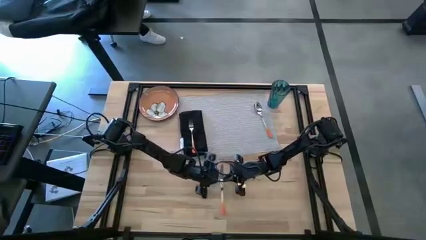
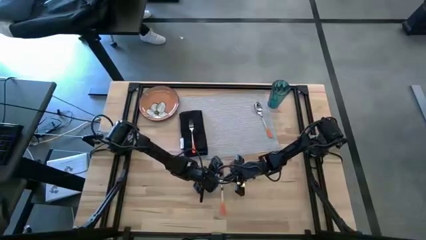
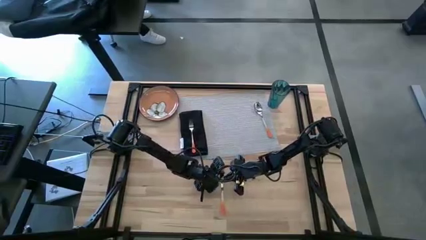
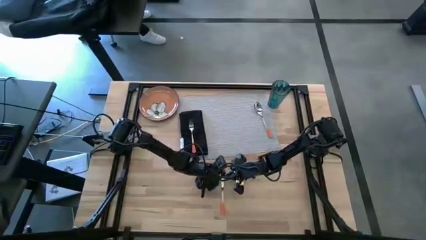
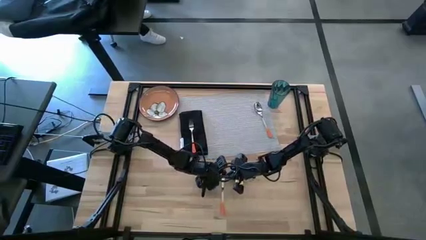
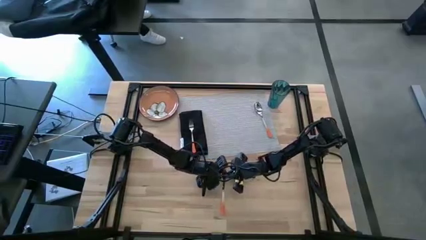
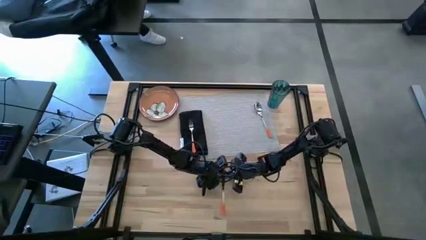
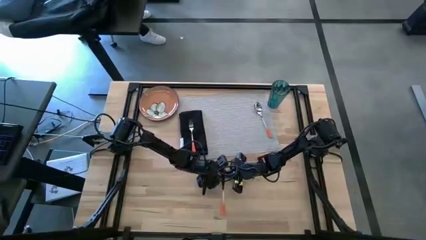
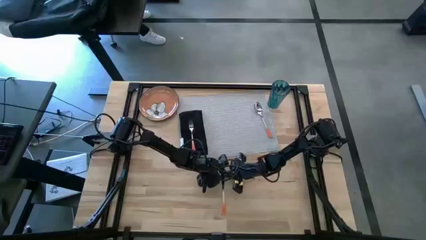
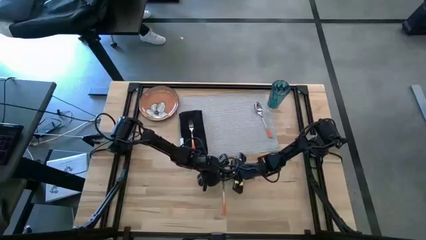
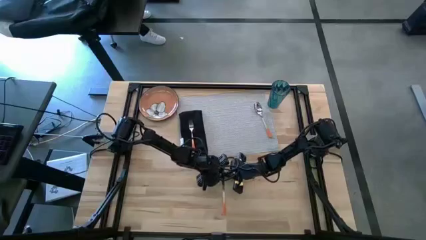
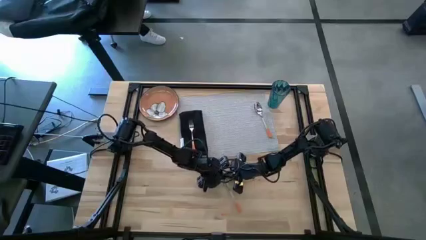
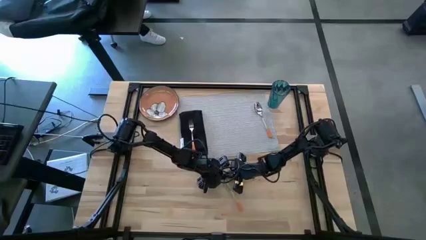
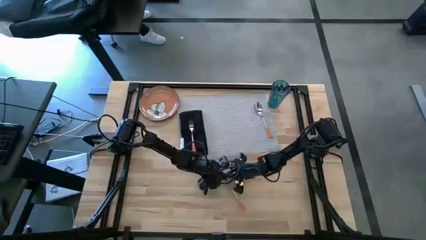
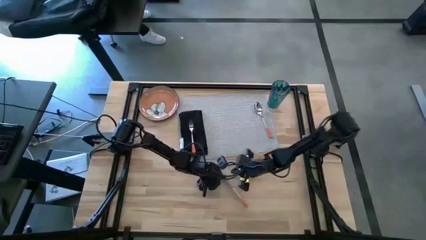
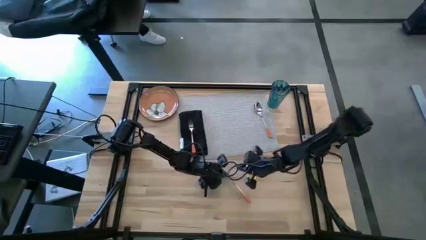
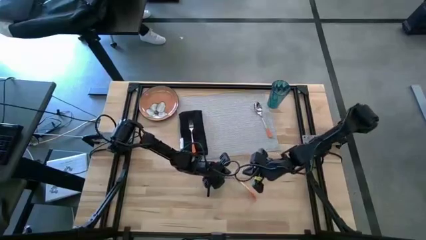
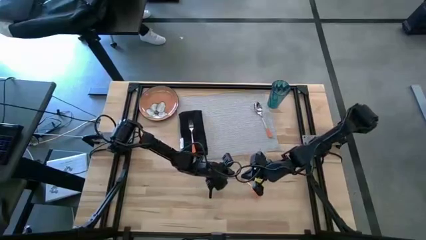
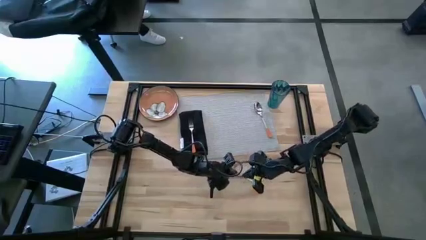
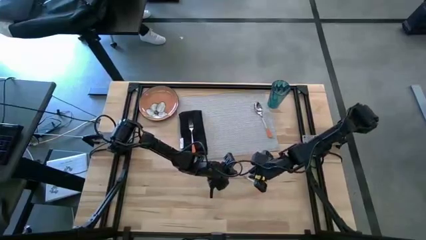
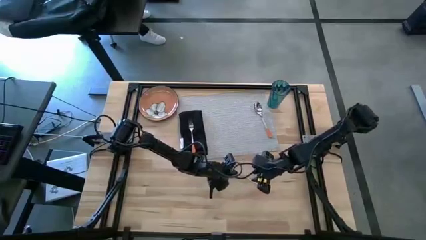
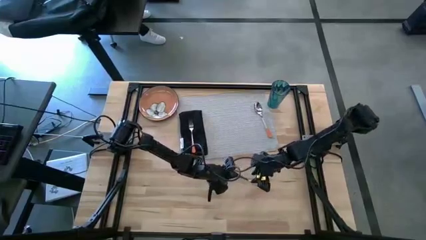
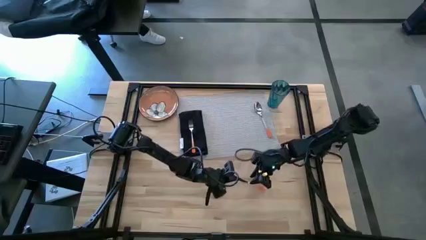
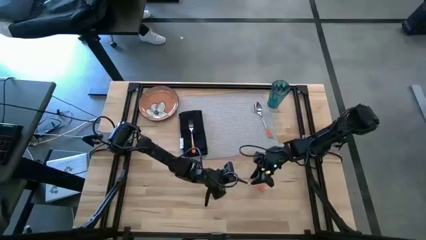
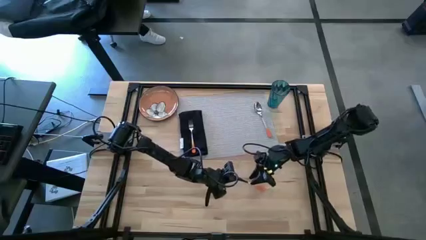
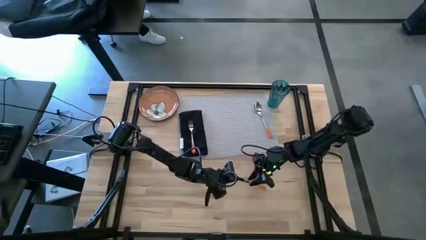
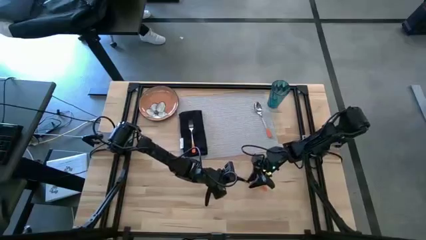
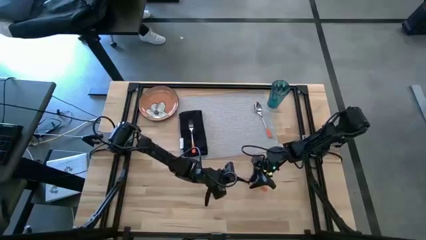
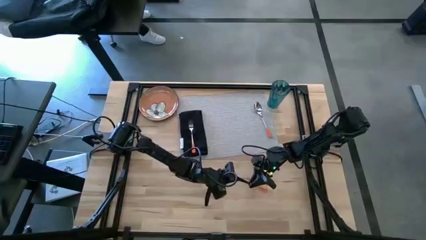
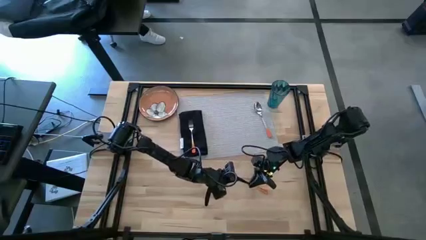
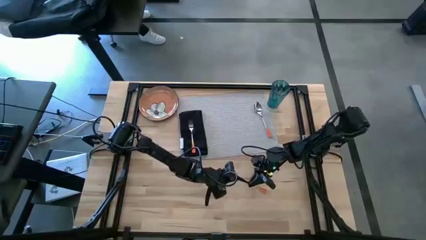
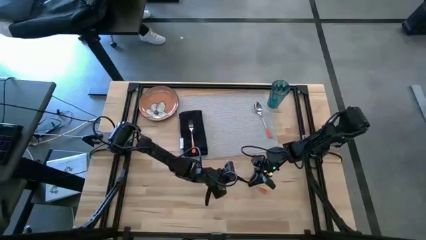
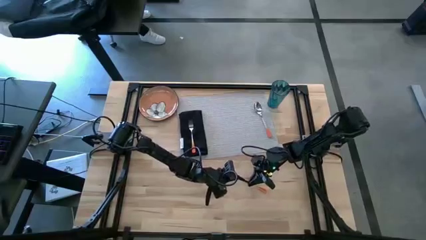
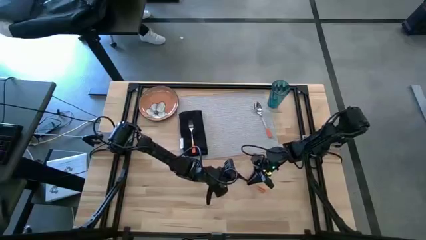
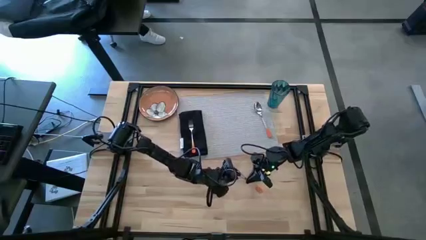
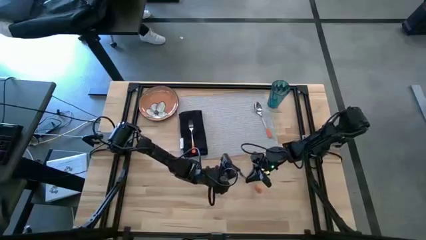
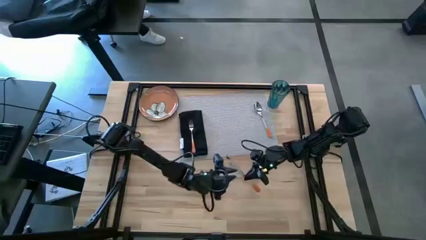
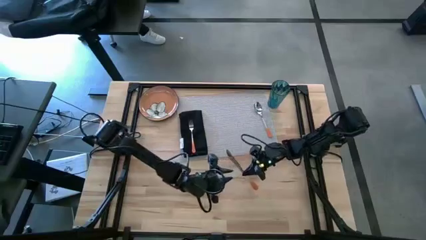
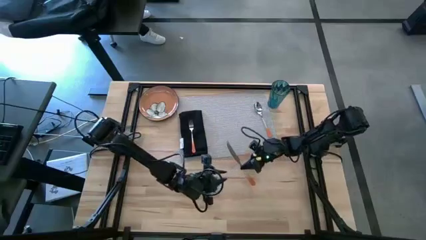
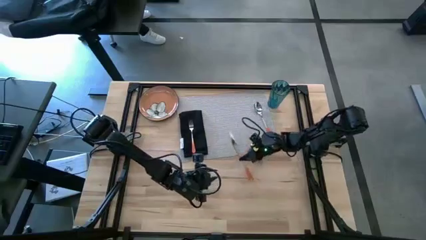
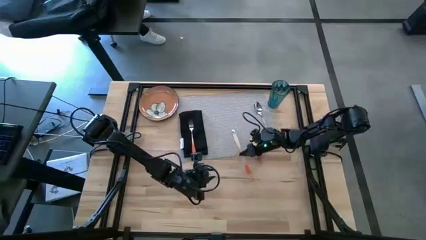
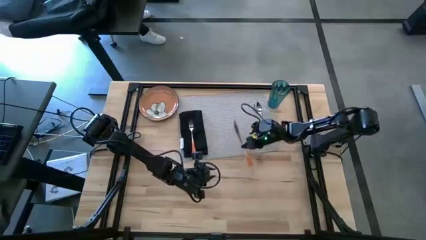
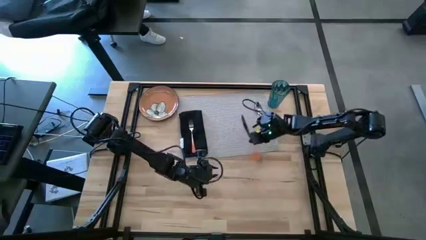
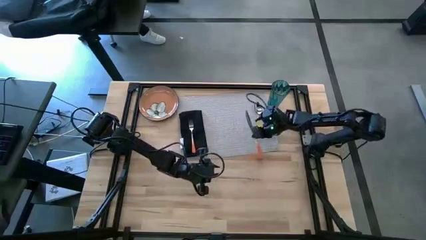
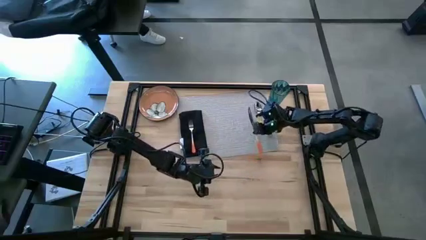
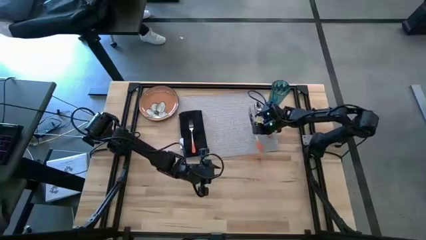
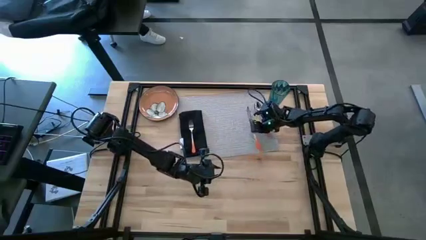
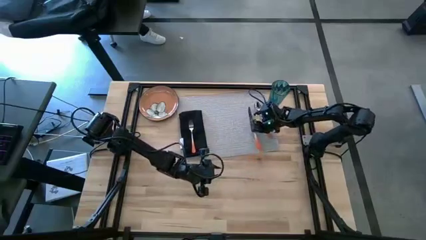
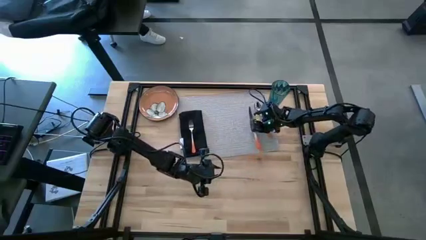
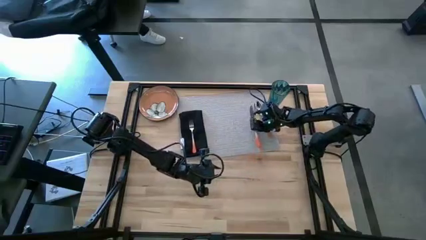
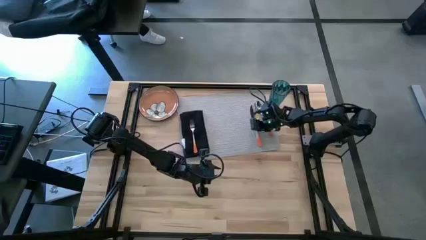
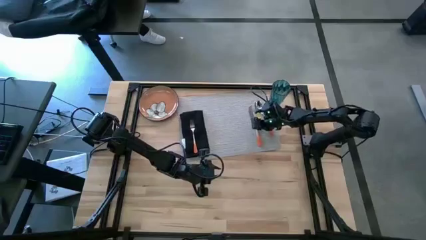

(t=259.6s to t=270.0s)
Task: Set table place
Put the orange table knife on the gray table mat beside the orange spoon

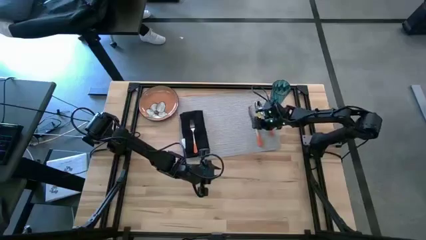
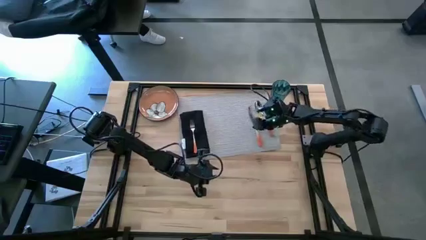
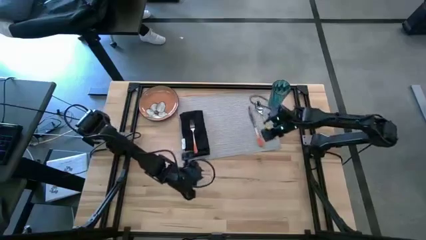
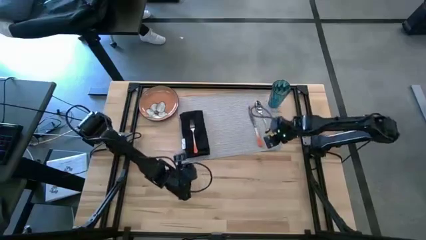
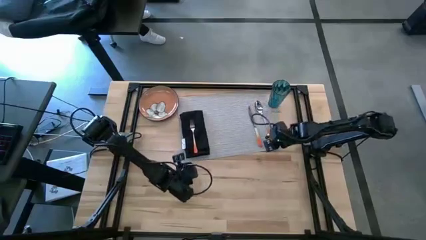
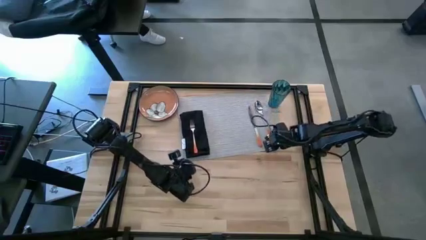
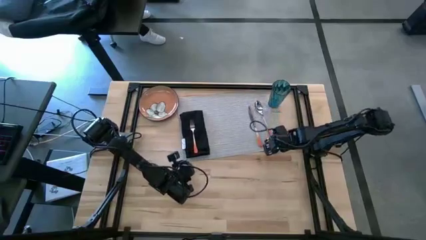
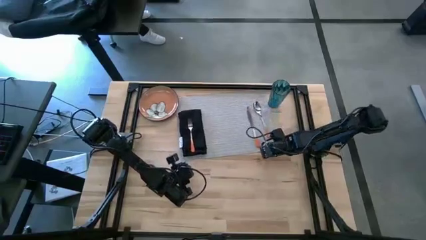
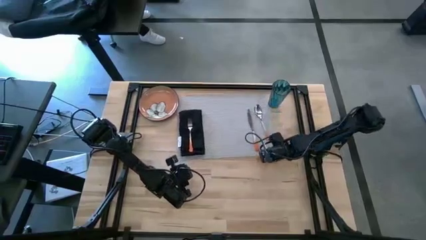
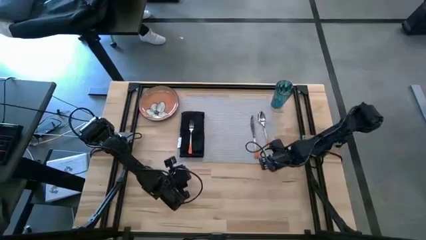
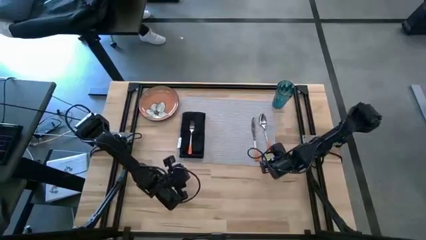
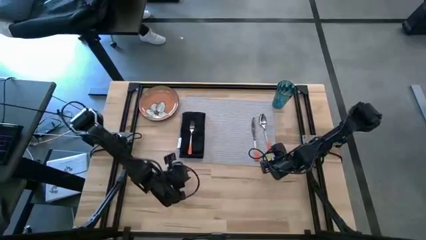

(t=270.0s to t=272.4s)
Adjust the gray table mat

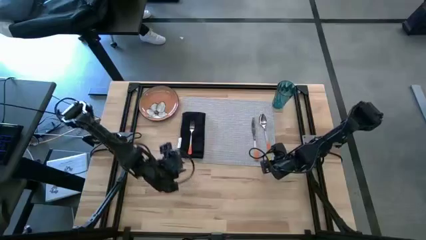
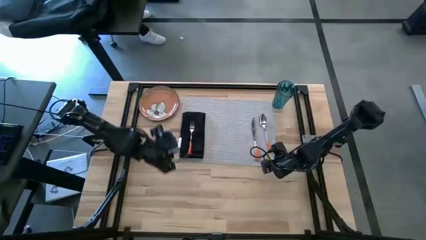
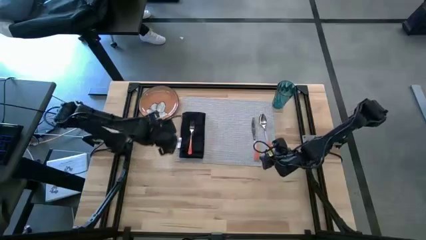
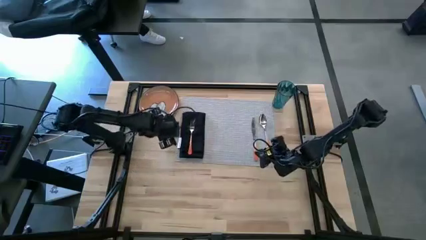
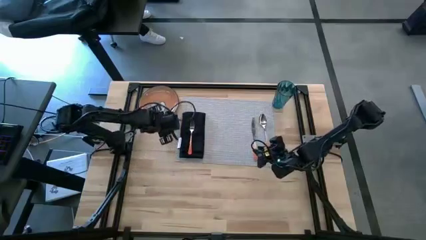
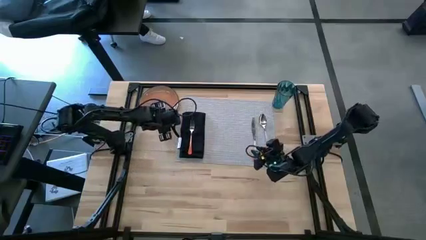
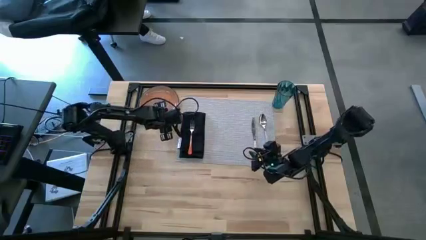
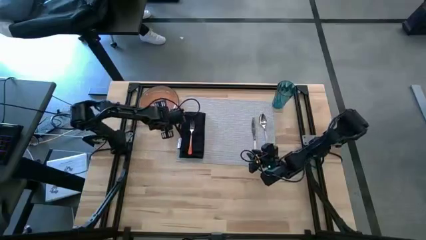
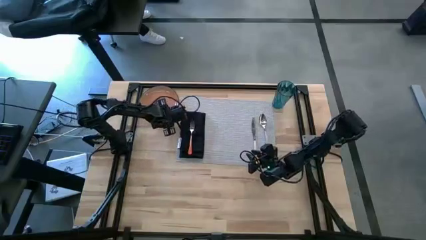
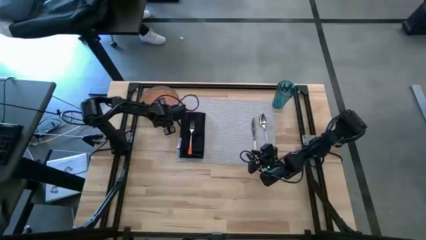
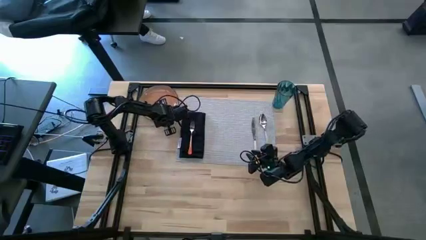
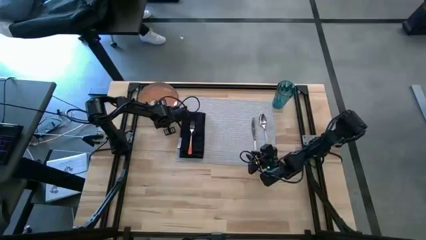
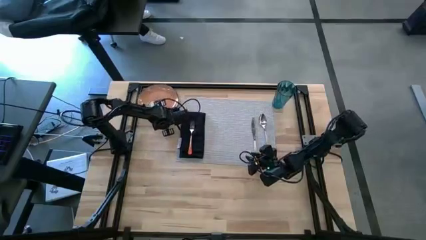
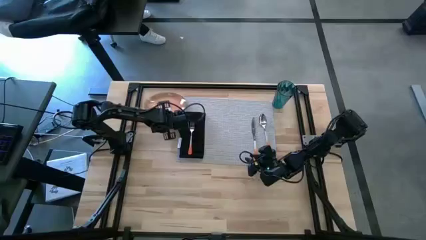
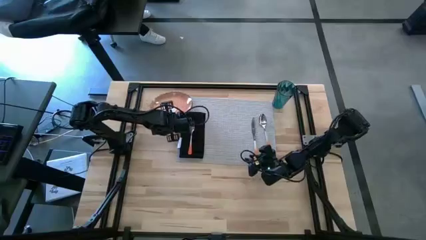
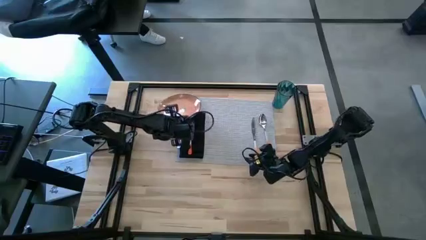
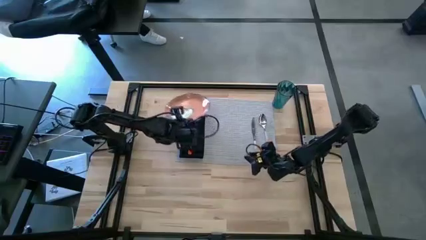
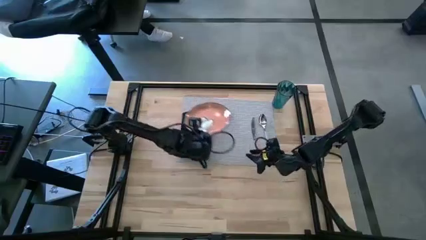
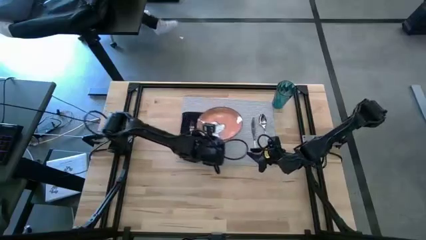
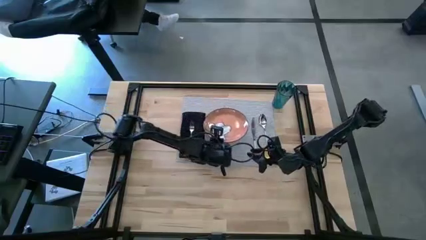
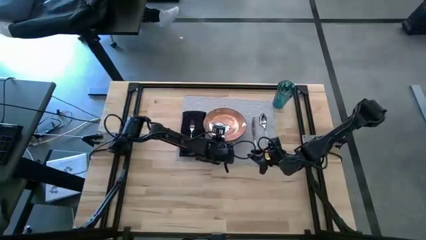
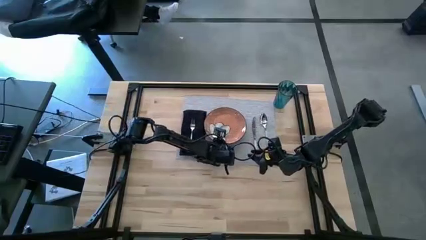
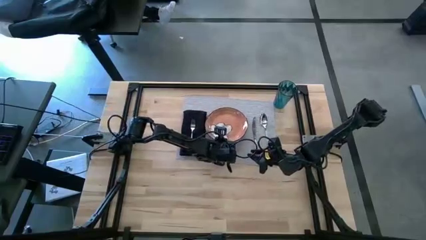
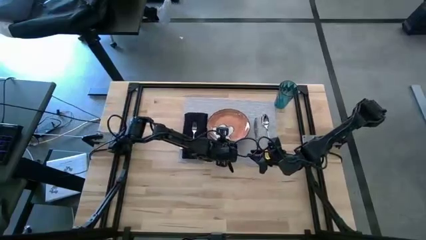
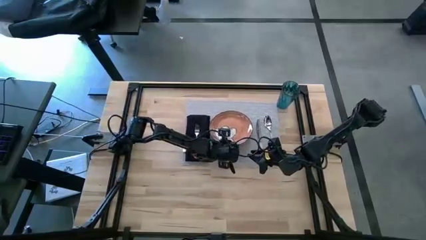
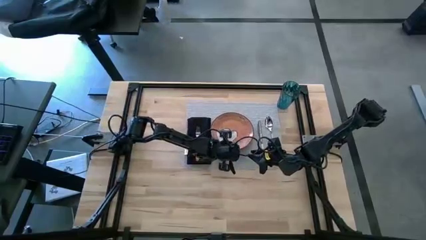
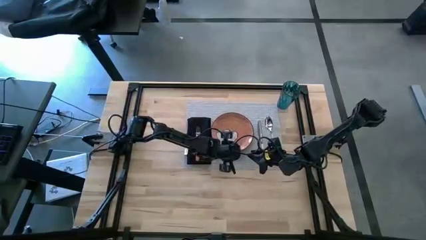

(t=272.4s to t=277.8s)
Put the orange plate on the gray table mat
